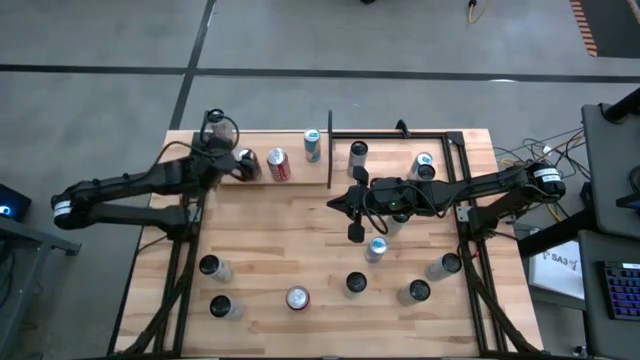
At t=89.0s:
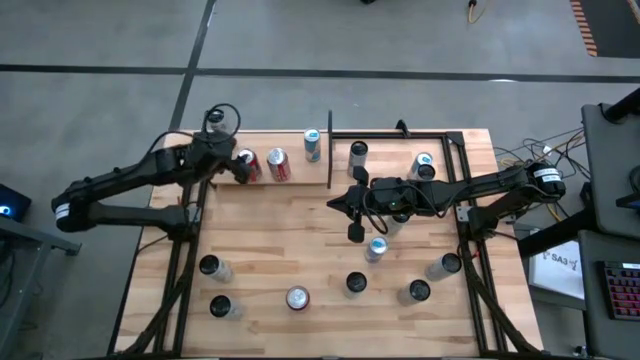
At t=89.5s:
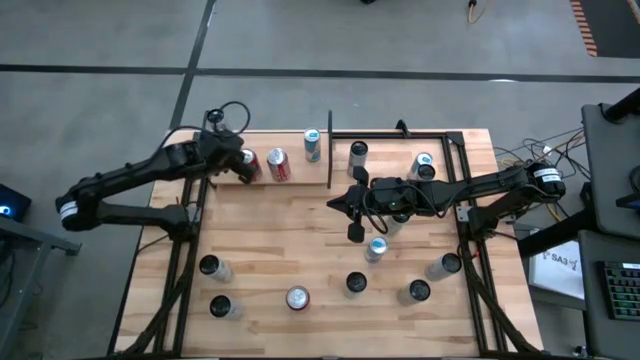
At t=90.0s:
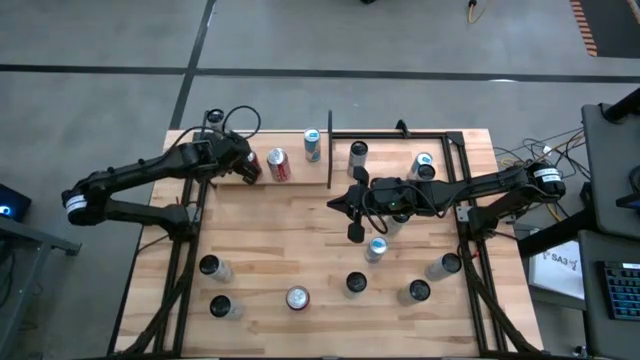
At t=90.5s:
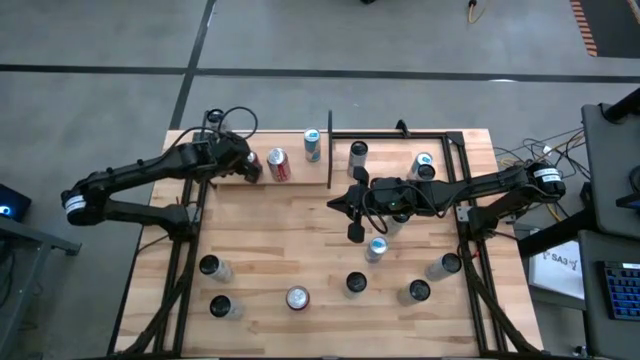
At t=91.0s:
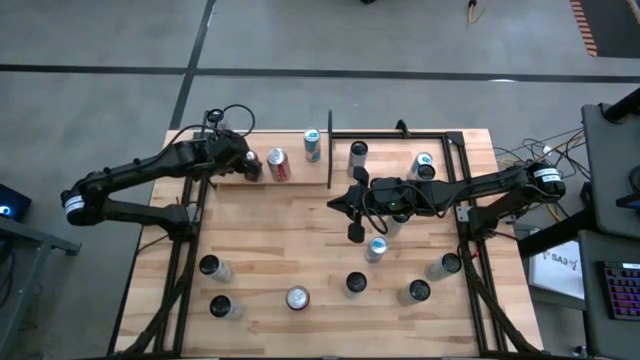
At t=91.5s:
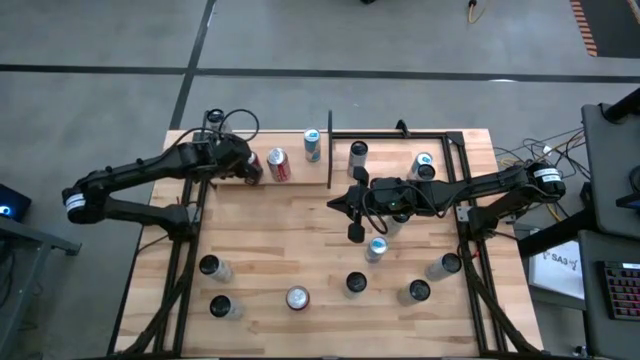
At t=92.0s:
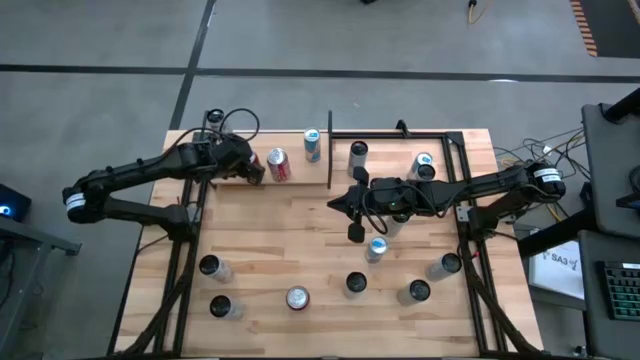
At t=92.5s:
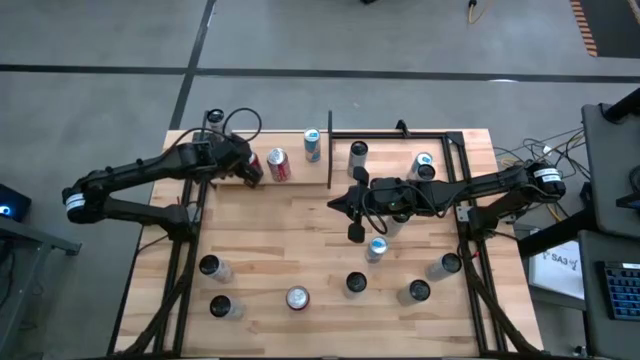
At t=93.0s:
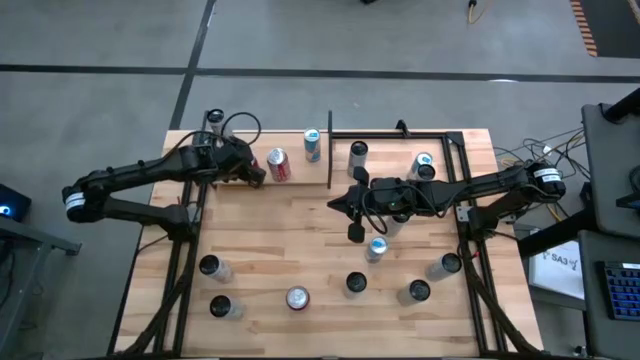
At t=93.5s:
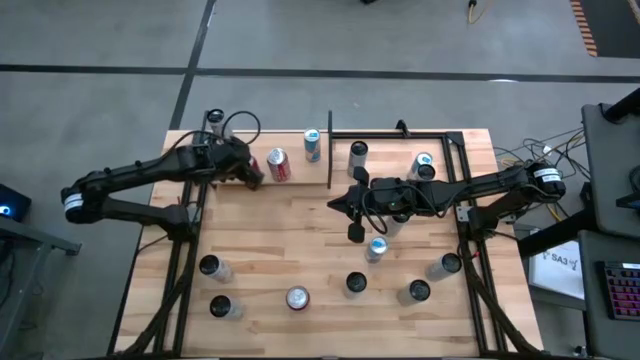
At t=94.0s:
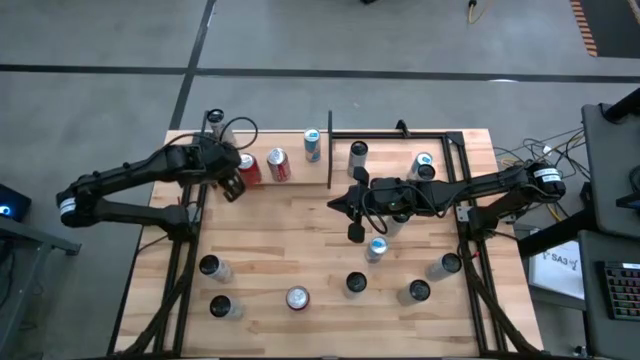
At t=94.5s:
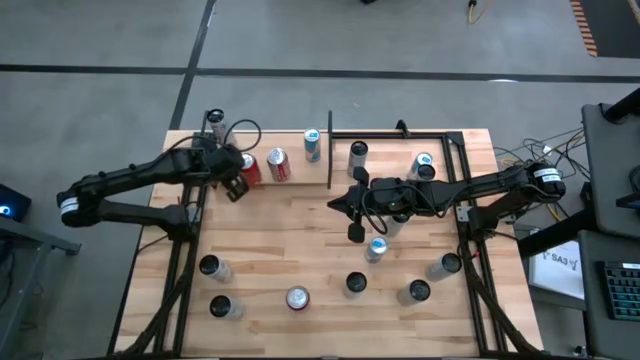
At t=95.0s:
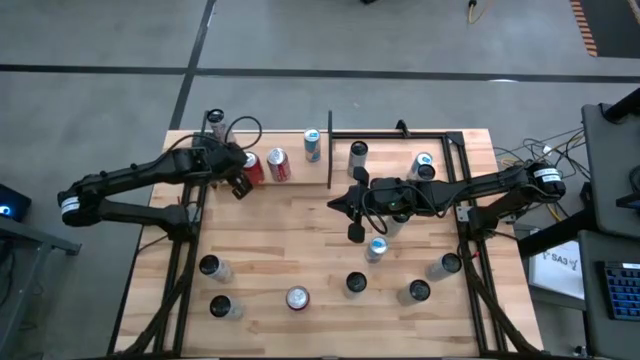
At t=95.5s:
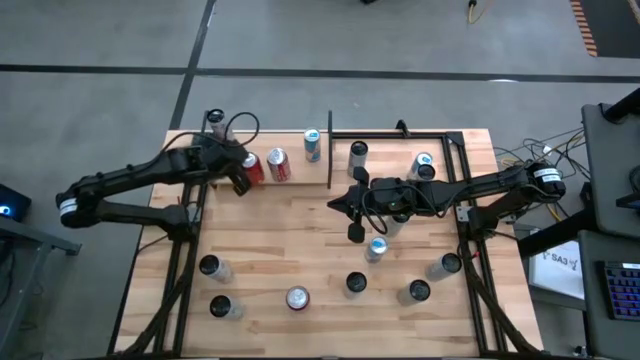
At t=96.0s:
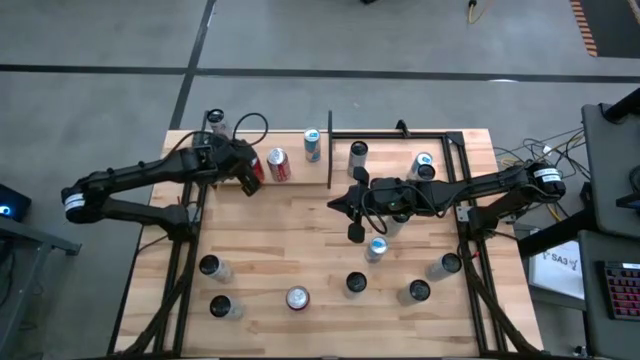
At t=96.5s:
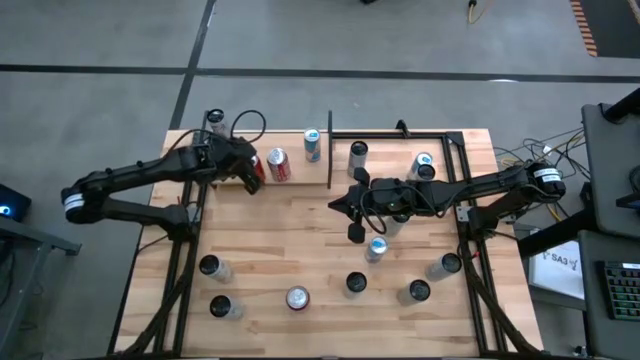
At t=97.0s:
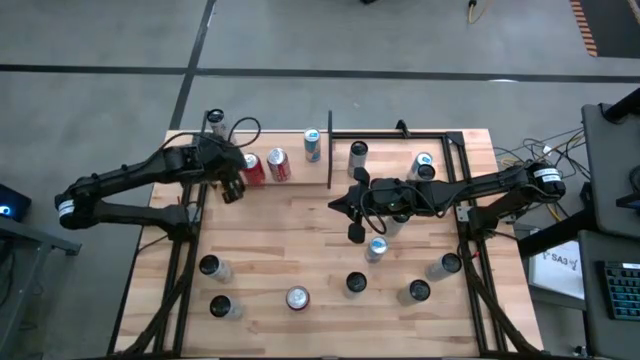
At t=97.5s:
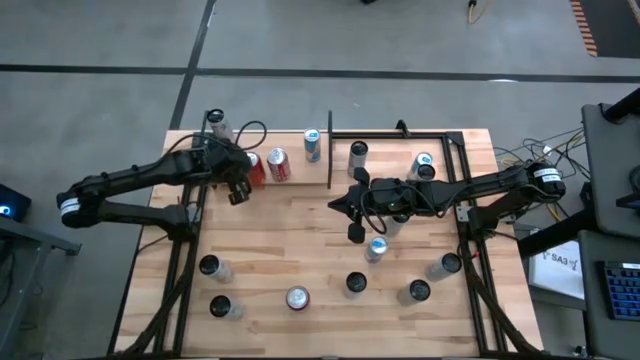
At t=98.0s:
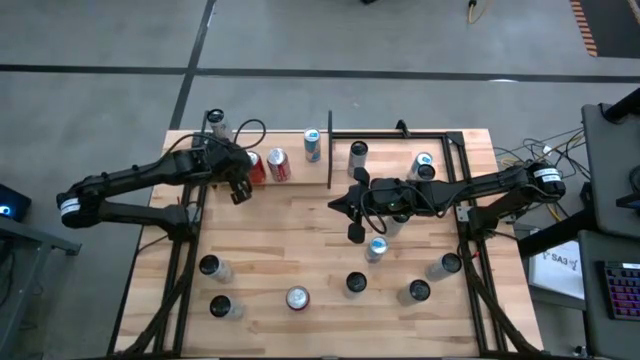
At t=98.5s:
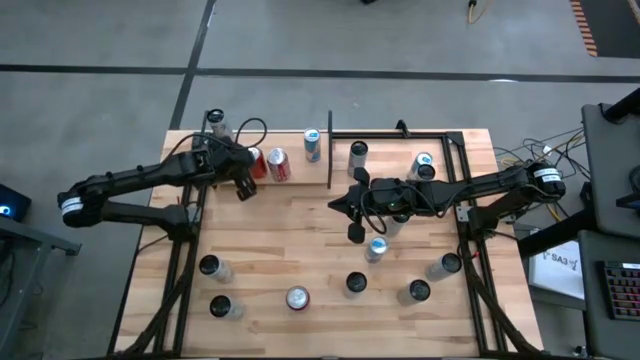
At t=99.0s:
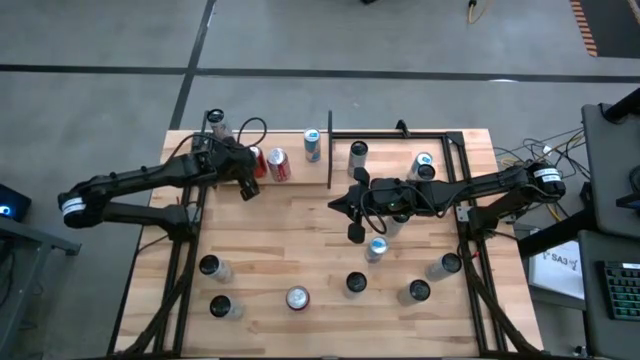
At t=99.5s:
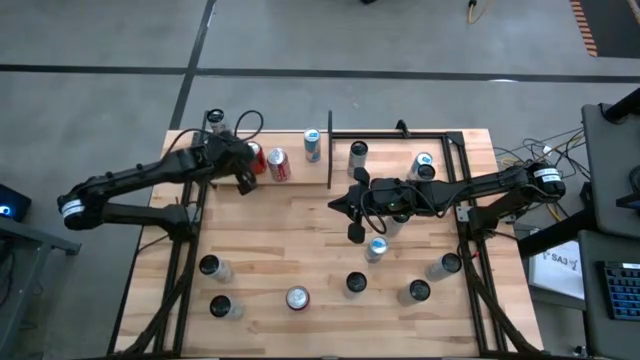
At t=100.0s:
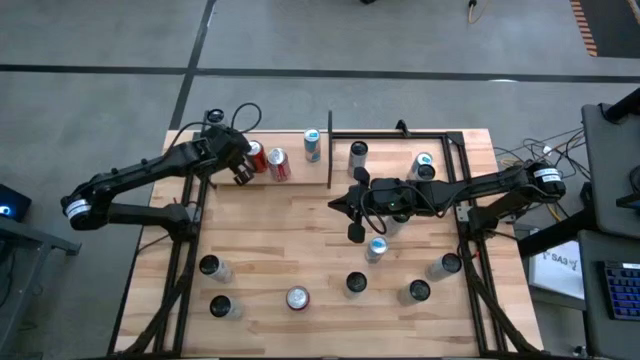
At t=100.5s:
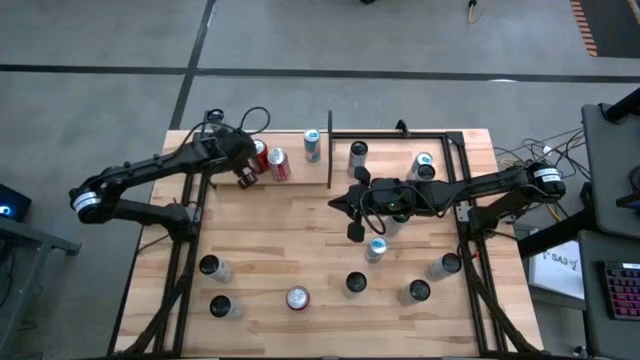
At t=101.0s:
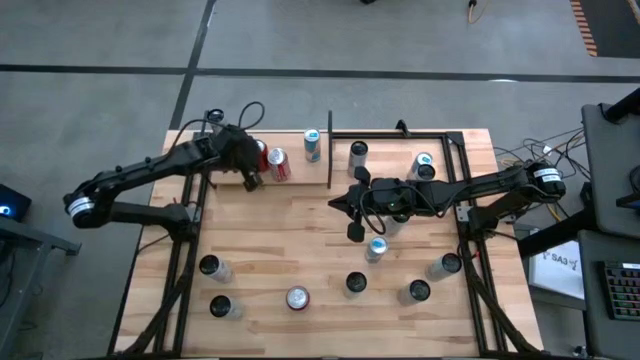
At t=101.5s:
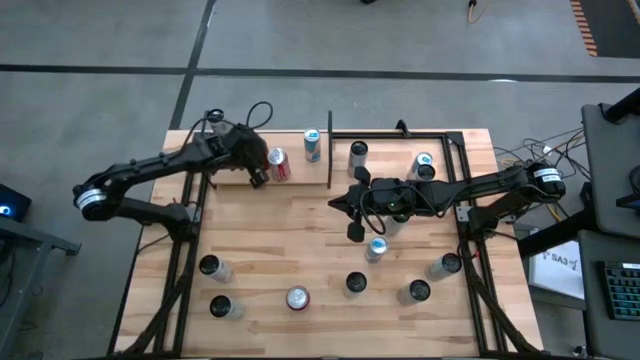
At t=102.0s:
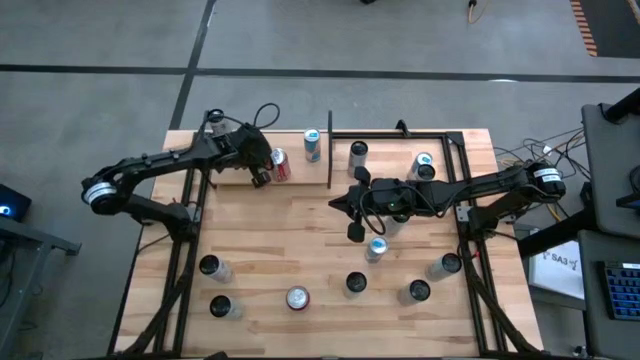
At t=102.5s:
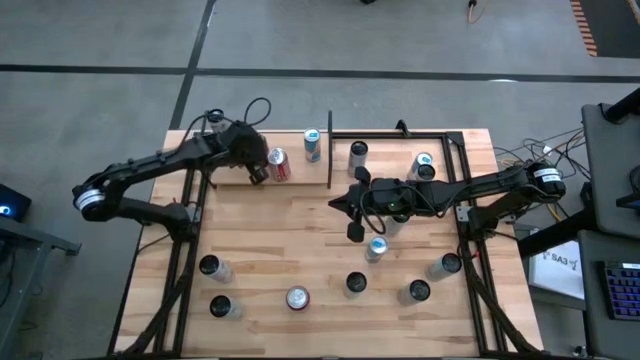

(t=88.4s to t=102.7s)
Task: Place canned beverage on shelf
Put the top red and black soda can on the shelf

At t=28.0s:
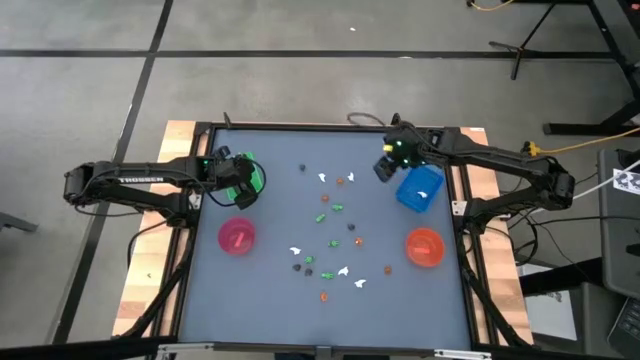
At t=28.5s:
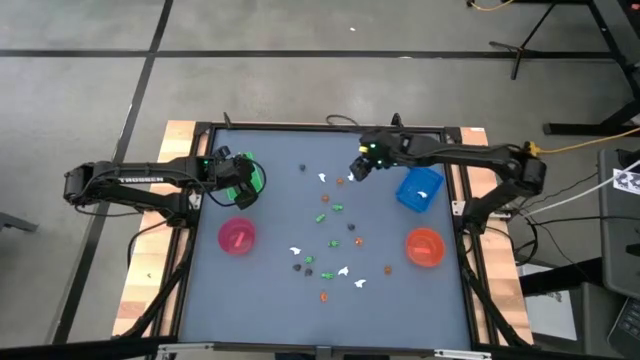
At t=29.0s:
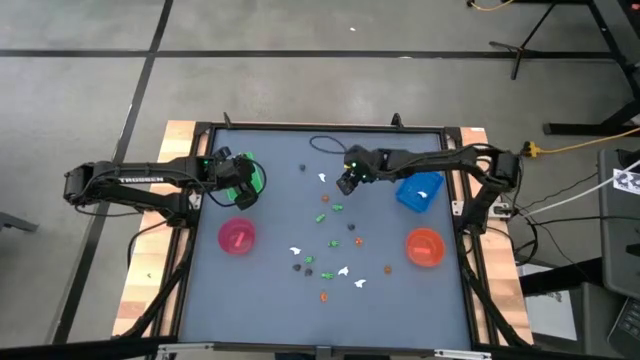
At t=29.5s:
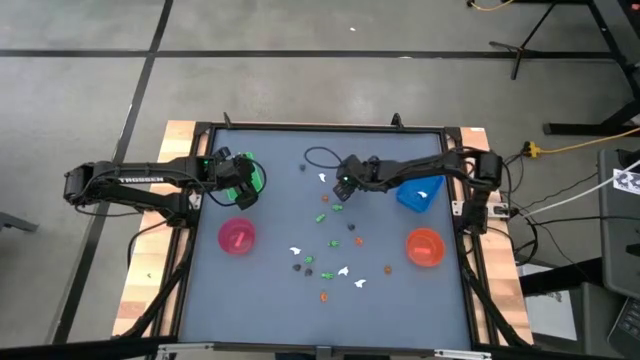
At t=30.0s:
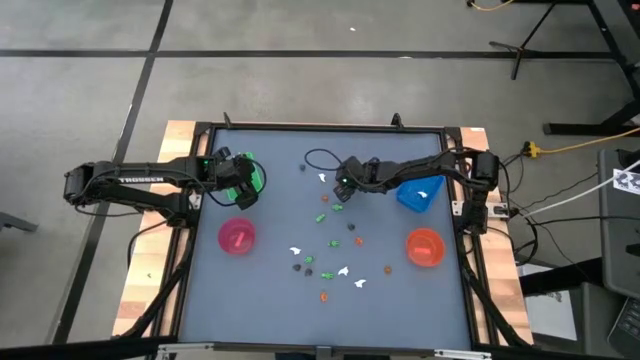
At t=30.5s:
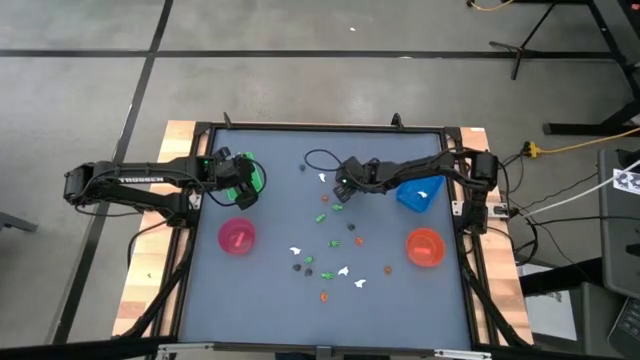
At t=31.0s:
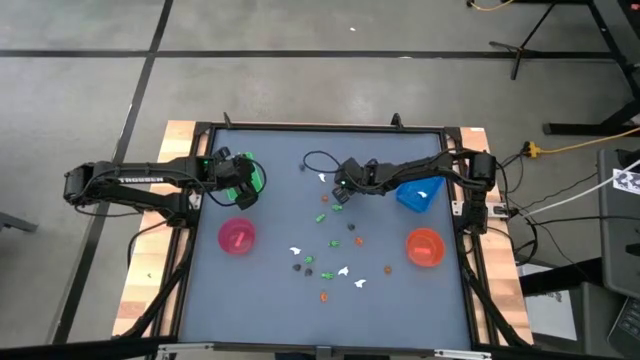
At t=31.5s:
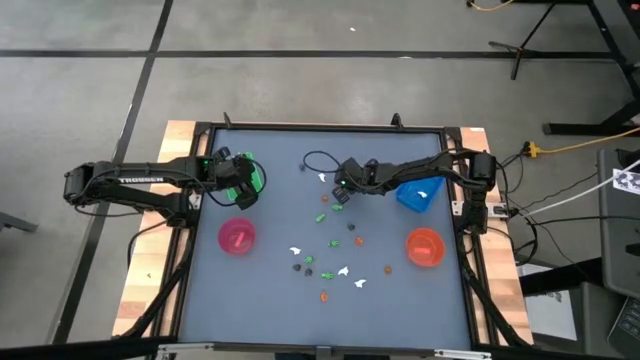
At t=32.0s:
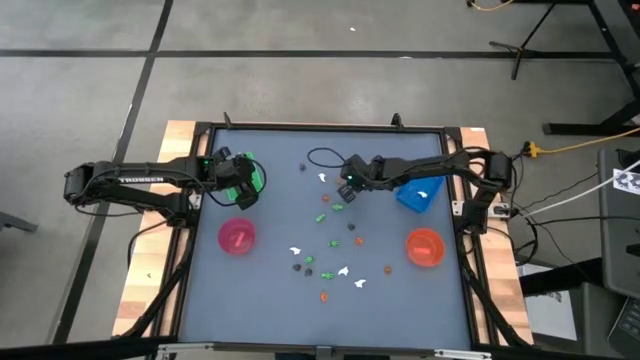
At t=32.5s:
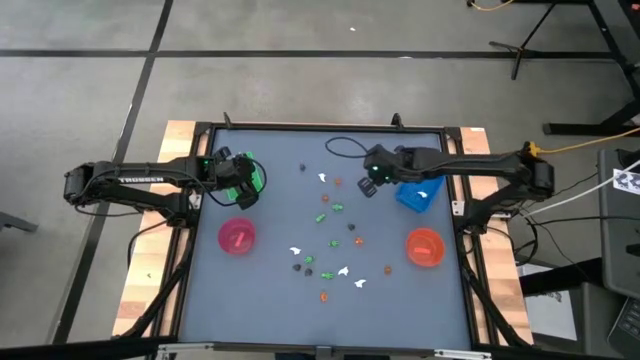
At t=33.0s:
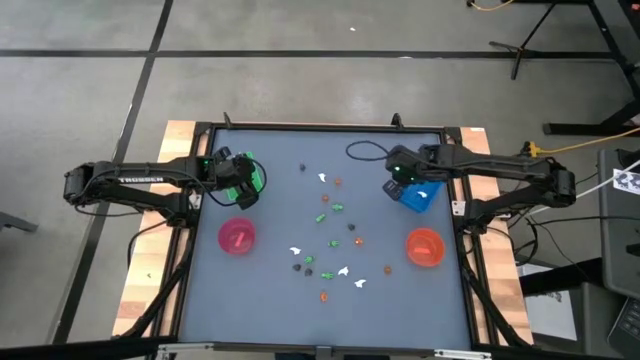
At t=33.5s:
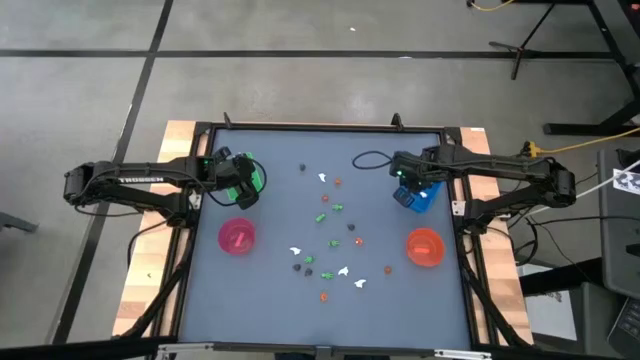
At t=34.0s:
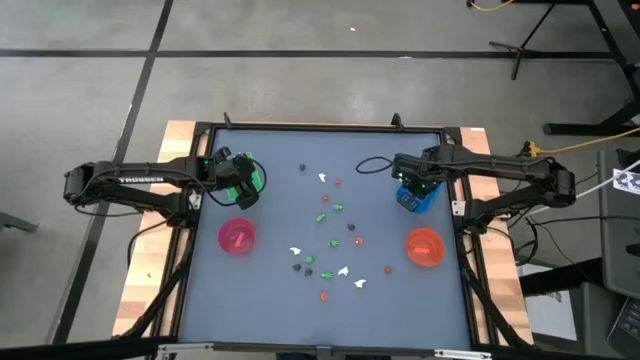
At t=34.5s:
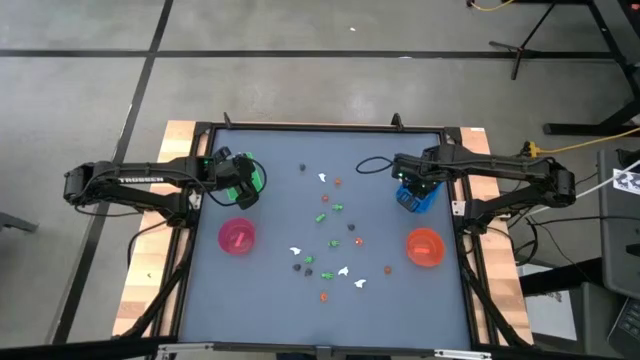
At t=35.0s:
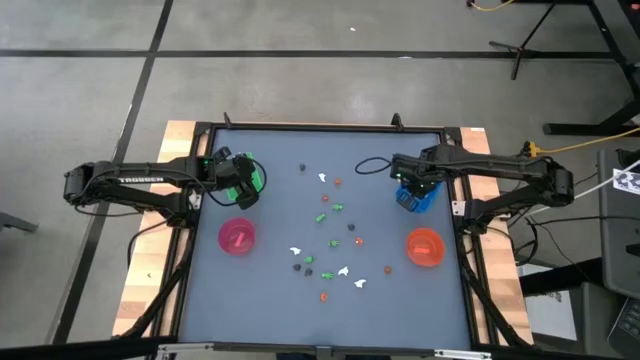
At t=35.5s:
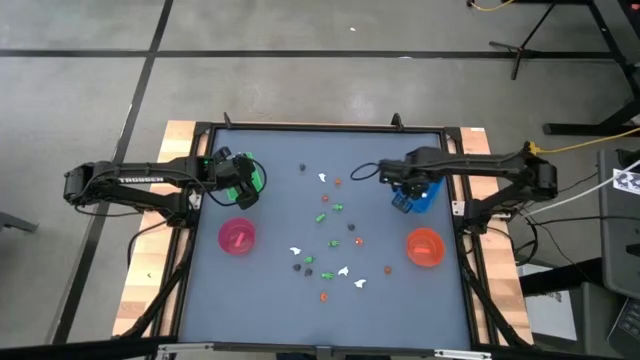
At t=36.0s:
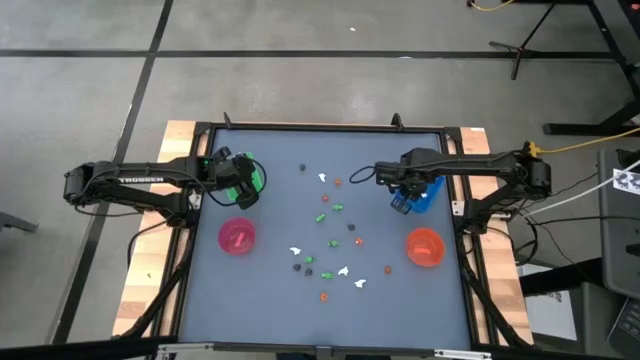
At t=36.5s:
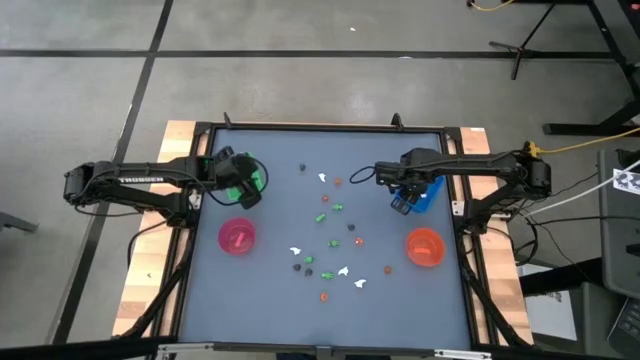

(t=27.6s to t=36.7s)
Task: Sort Halloween decoration
Put the small white ghost toy into the blue basket
